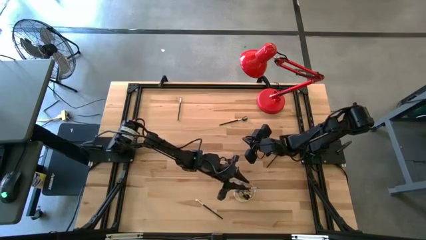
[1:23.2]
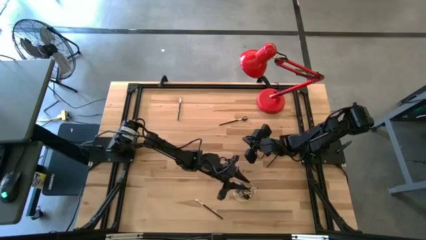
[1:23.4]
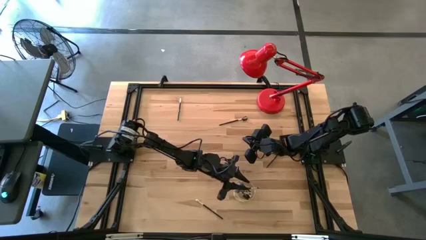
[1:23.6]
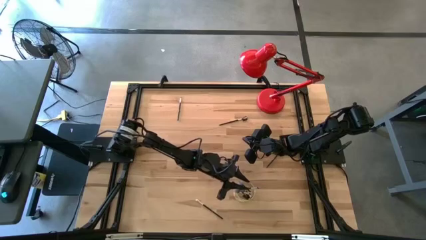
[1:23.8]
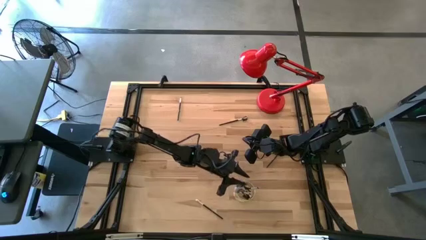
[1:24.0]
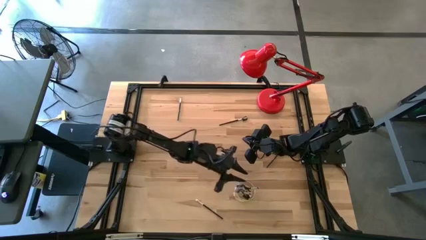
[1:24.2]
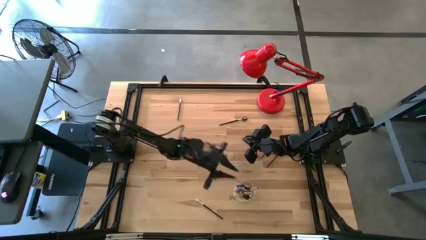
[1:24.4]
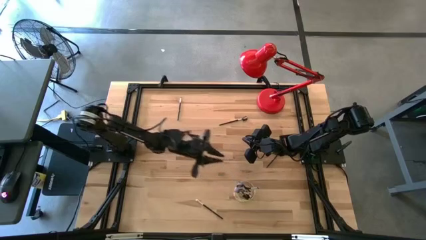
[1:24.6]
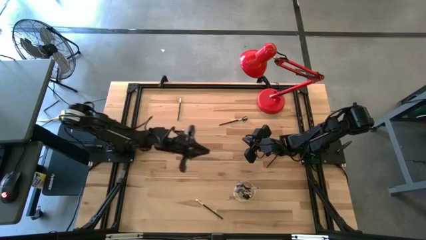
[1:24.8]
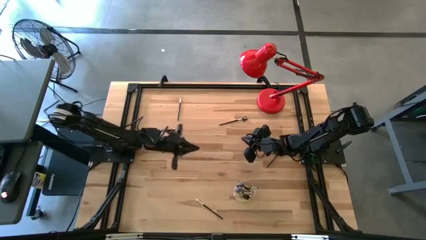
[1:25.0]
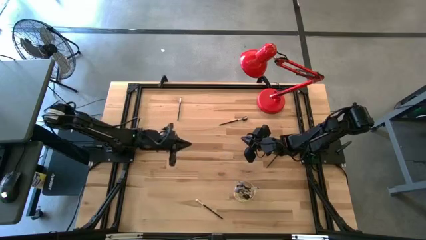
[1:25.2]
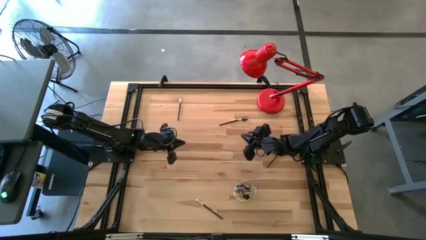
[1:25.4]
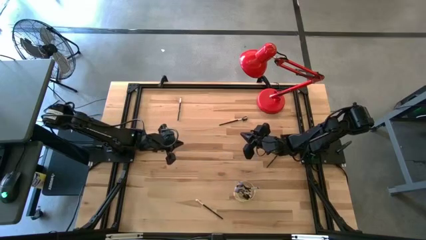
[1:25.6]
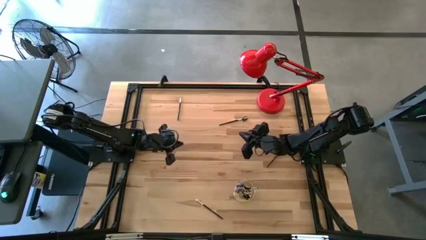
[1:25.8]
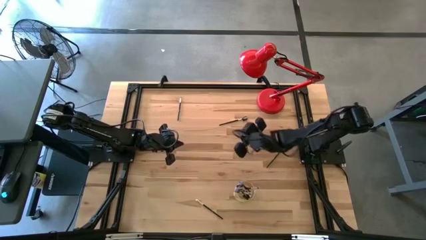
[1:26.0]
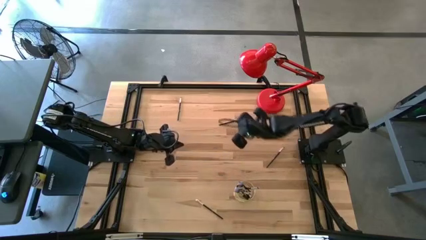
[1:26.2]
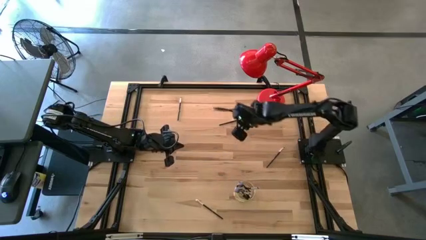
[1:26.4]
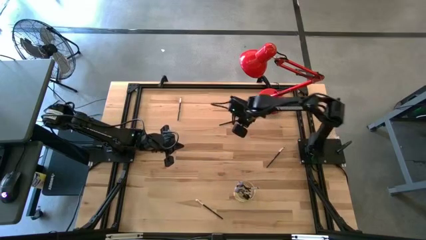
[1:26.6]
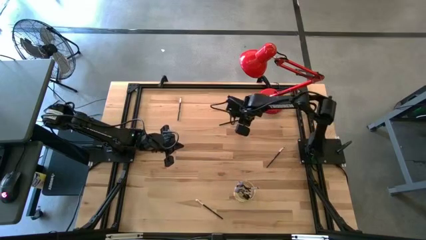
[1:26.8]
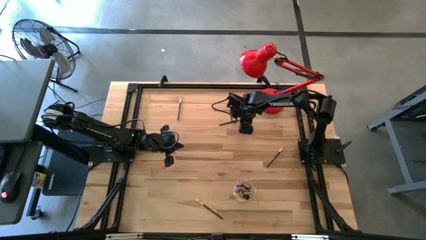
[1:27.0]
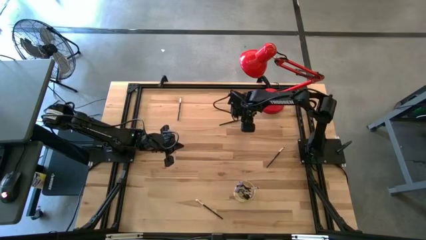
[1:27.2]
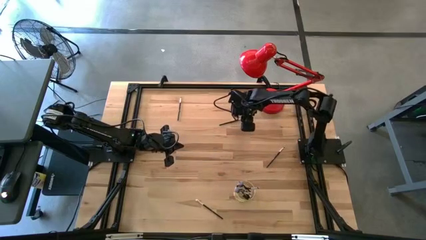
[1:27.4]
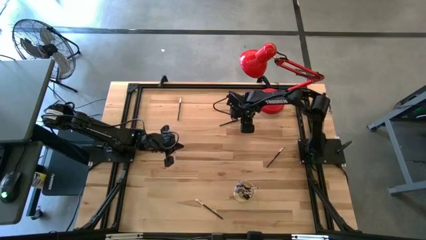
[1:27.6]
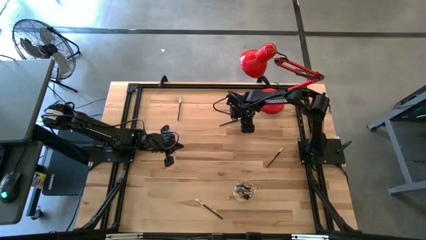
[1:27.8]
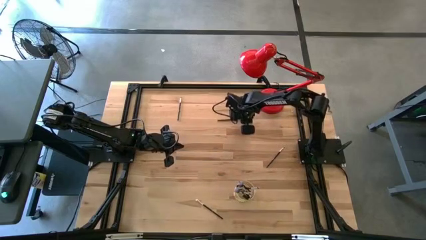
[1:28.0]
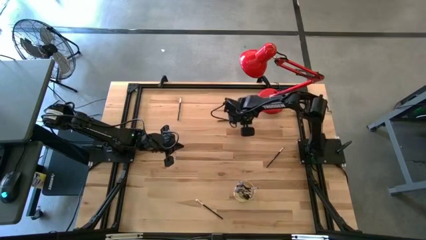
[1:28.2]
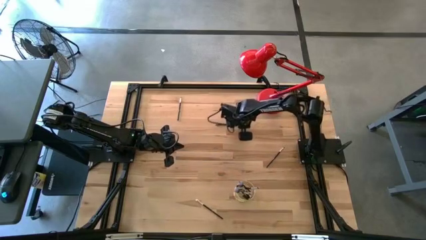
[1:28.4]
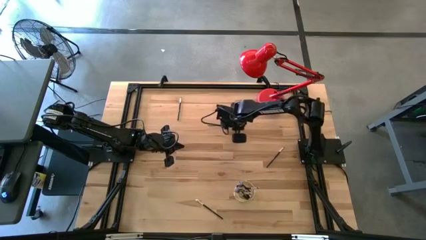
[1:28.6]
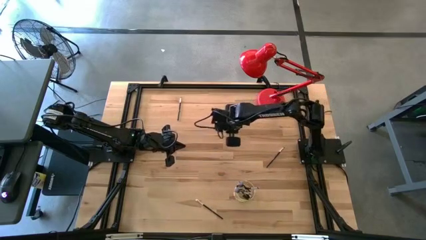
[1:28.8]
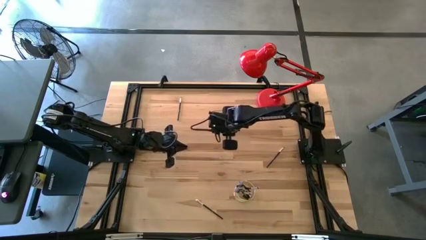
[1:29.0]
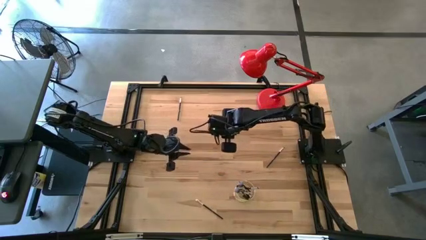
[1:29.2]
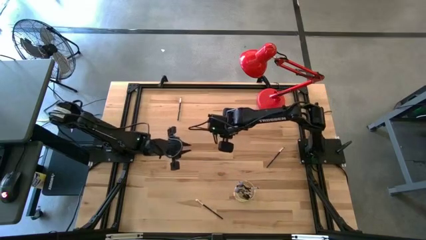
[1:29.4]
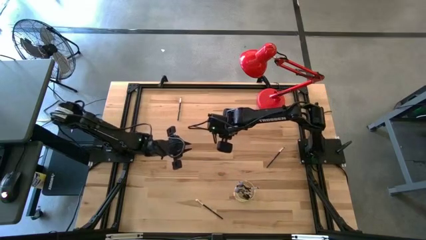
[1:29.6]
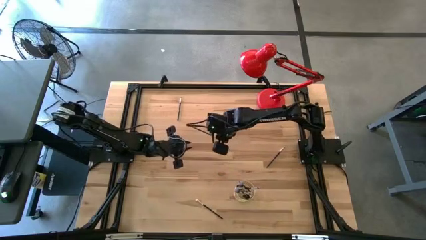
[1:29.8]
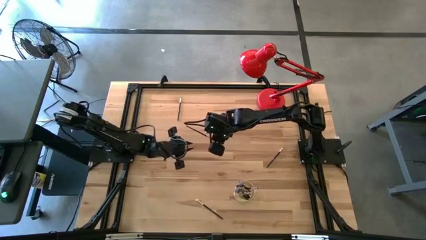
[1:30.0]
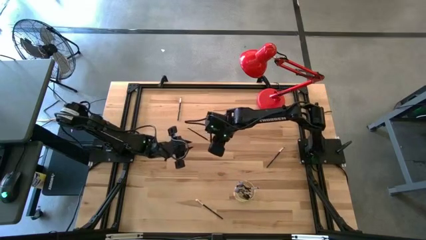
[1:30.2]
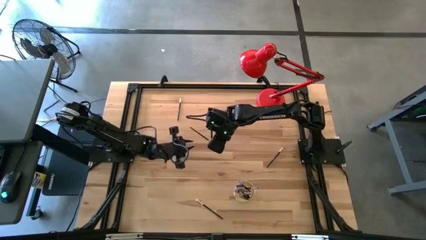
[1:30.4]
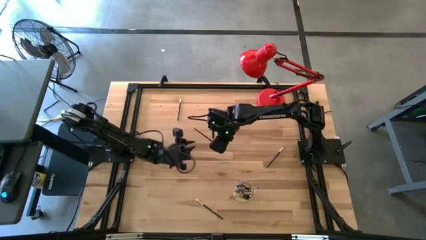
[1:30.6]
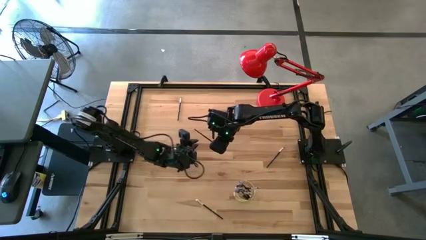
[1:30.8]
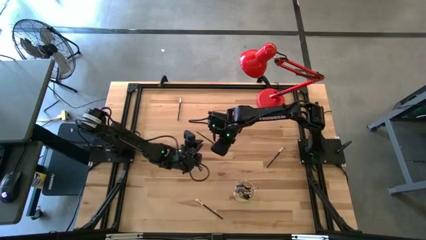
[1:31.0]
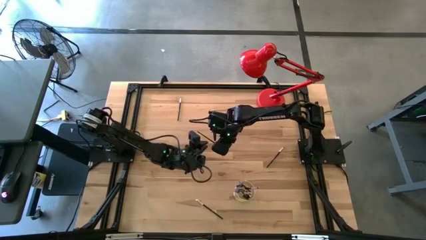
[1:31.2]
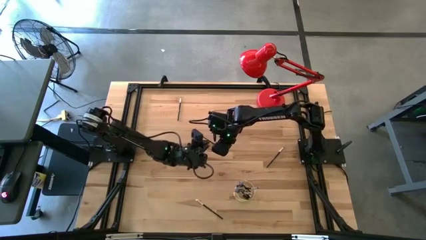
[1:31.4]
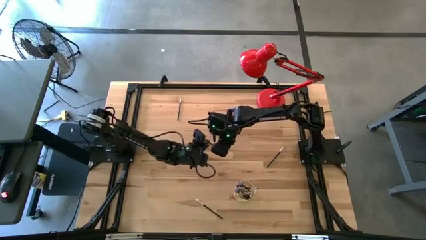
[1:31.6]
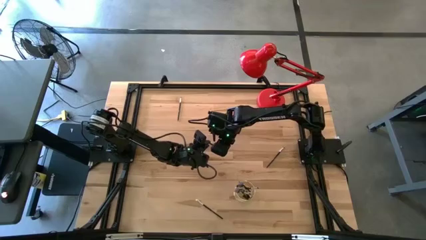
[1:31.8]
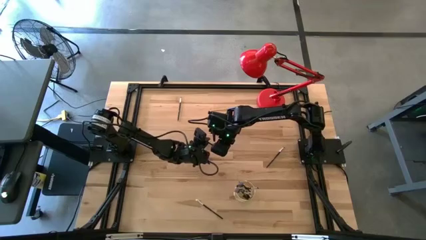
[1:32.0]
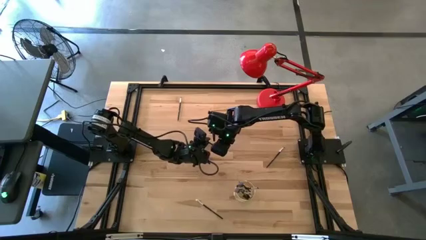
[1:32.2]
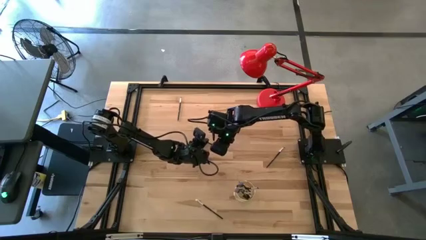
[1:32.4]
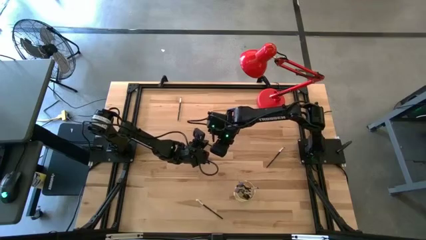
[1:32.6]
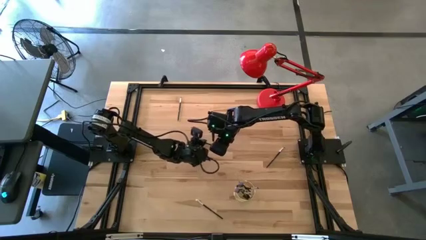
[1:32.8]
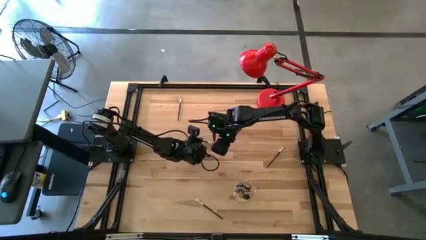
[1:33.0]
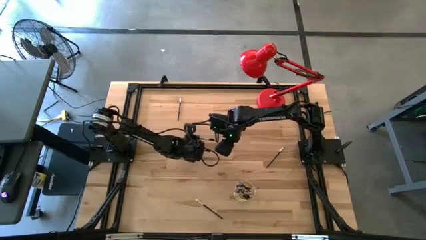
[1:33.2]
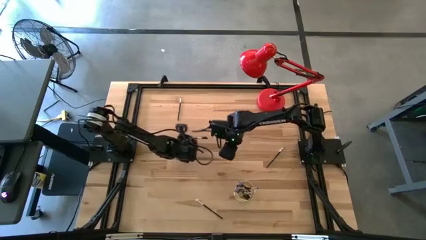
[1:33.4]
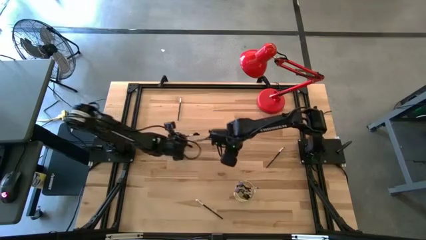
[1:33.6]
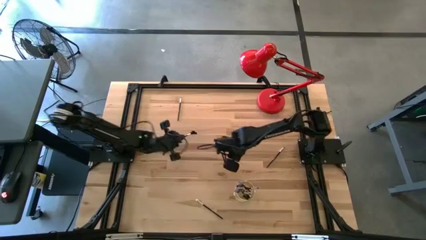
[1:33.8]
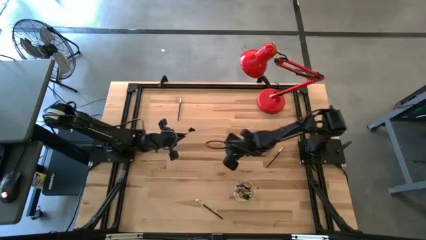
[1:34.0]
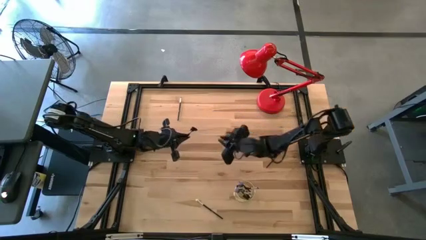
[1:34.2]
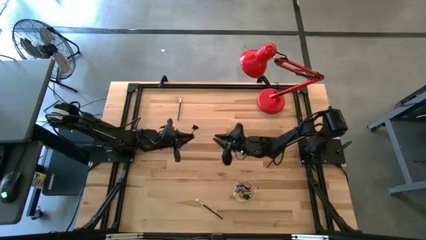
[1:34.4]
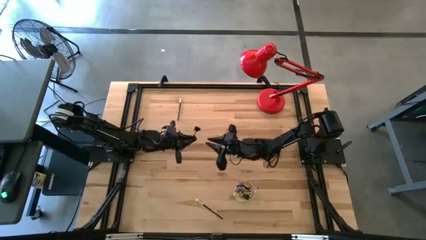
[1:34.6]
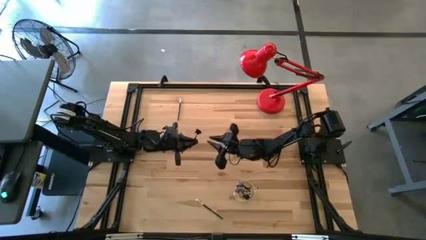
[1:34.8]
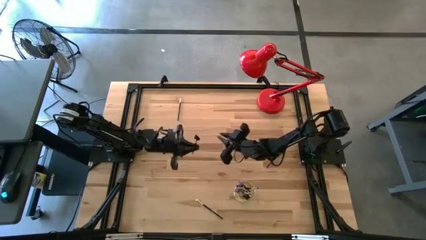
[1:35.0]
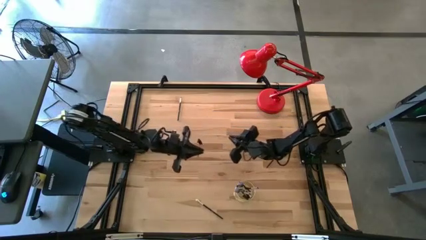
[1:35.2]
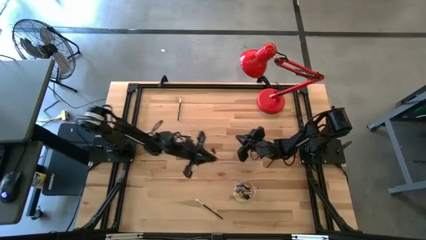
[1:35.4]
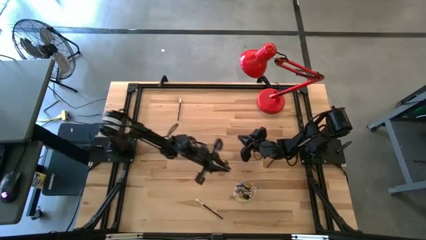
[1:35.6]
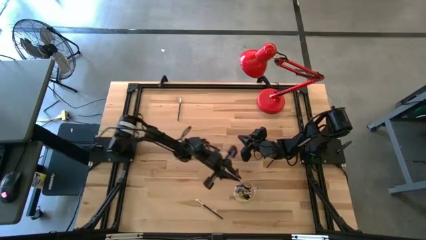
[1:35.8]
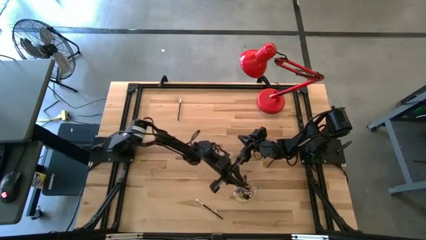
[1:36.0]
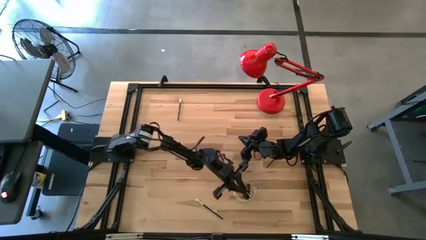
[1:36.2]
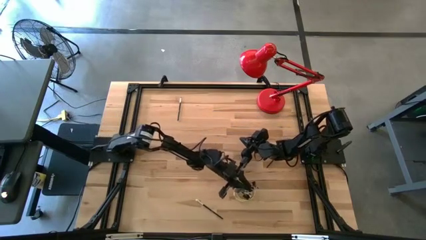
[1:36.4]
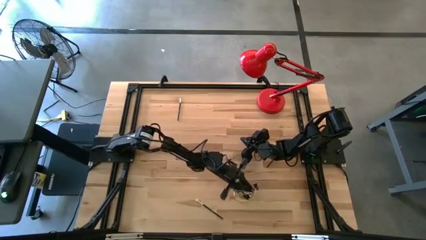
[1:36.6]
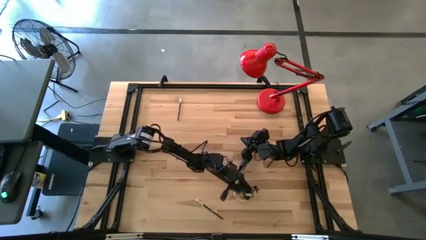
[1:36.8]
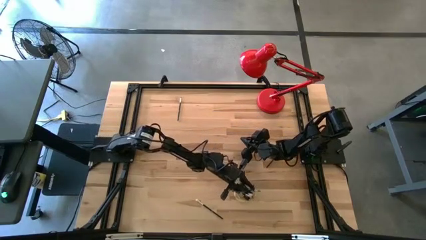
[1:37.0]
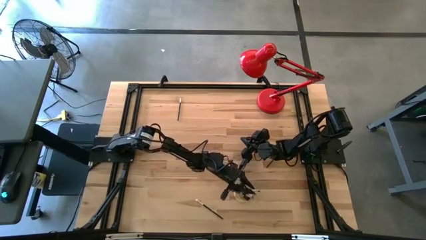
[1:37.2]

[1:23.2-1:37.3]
Task: Pick & Place Makeup Brushes
Put the eye groomer brush into the gold makeup holder
